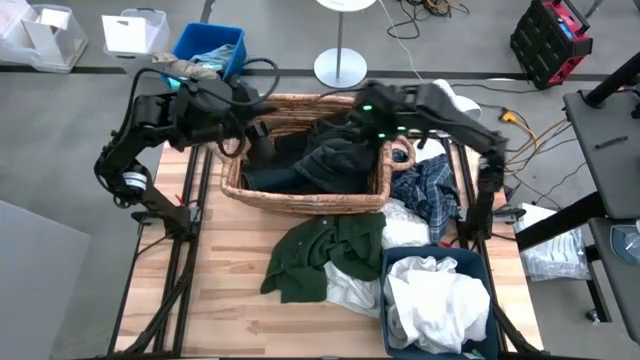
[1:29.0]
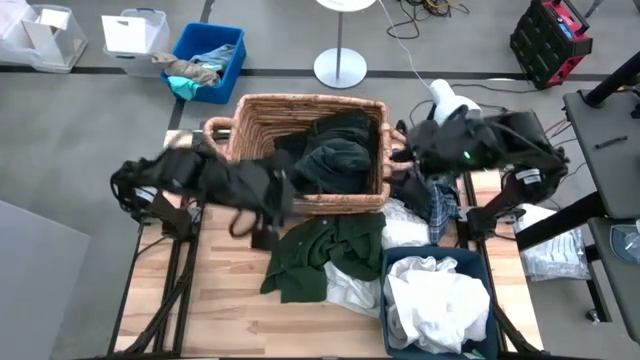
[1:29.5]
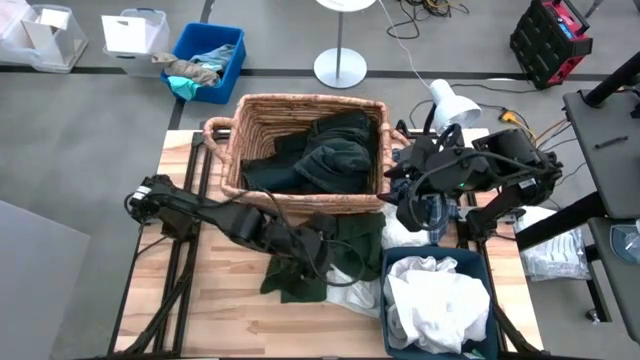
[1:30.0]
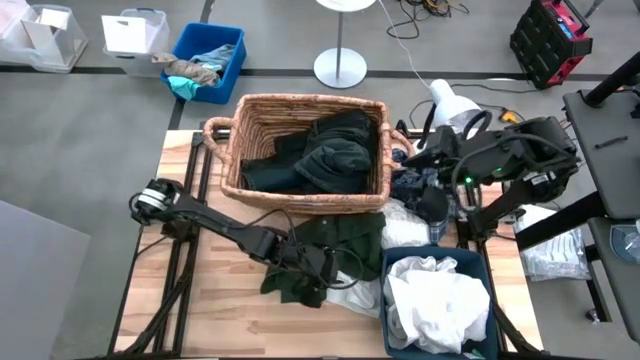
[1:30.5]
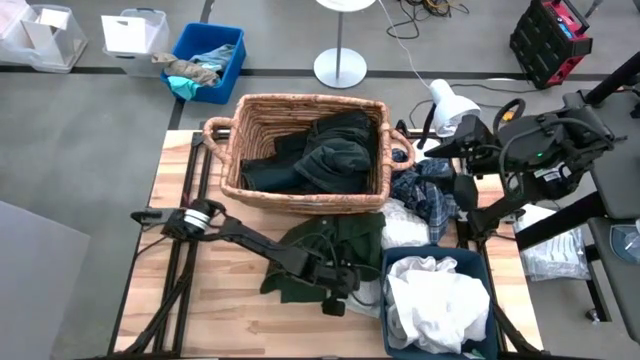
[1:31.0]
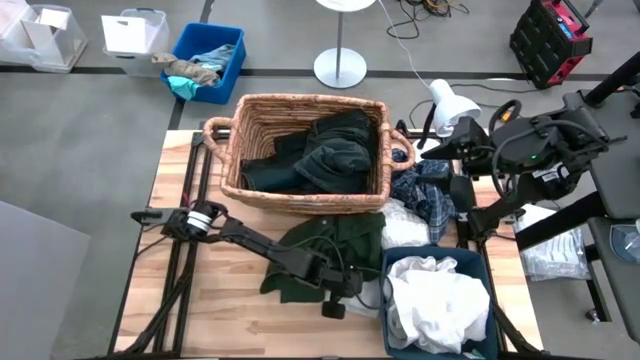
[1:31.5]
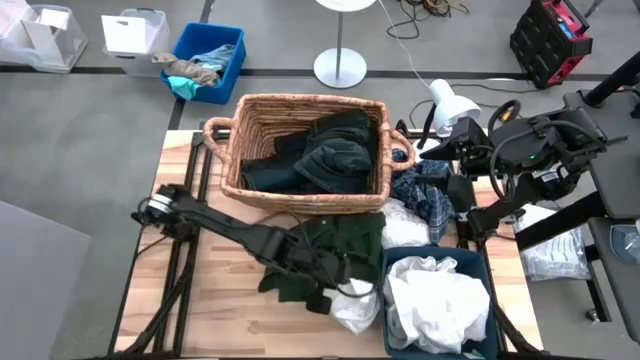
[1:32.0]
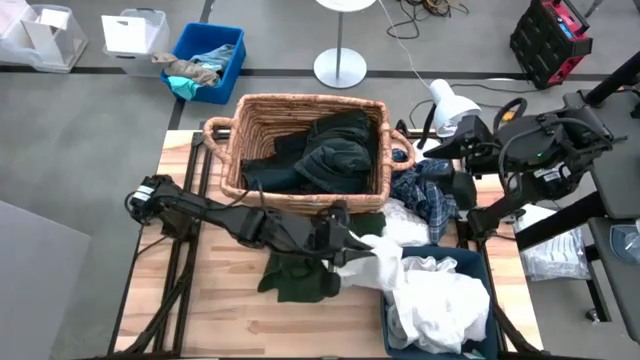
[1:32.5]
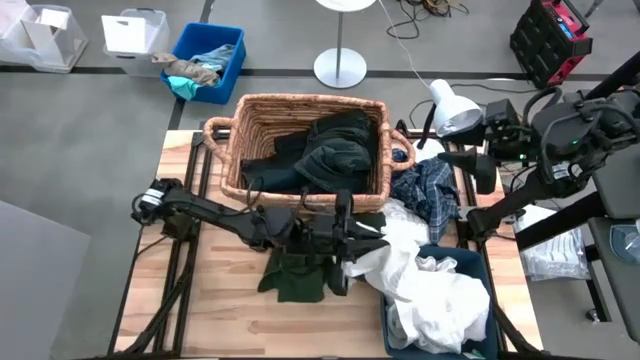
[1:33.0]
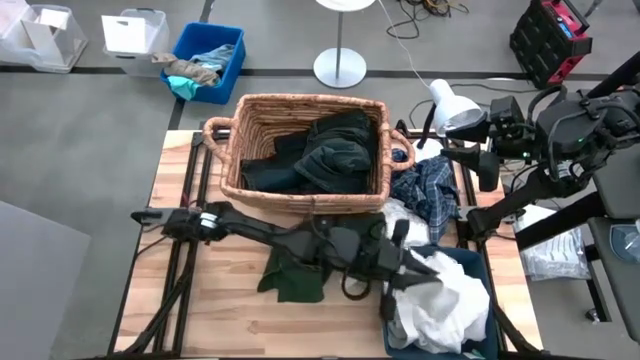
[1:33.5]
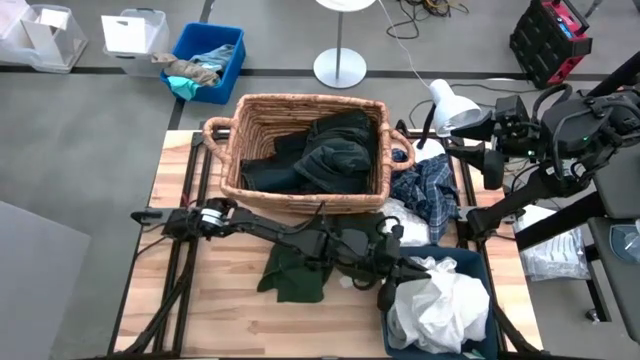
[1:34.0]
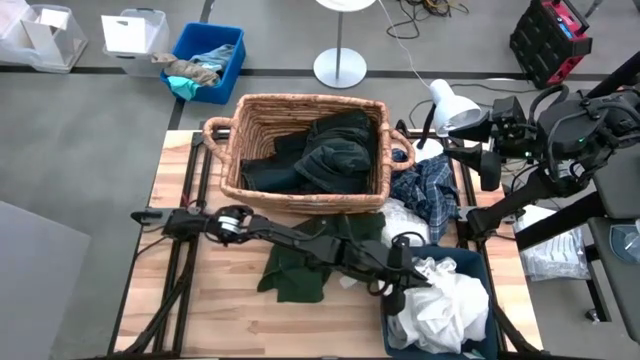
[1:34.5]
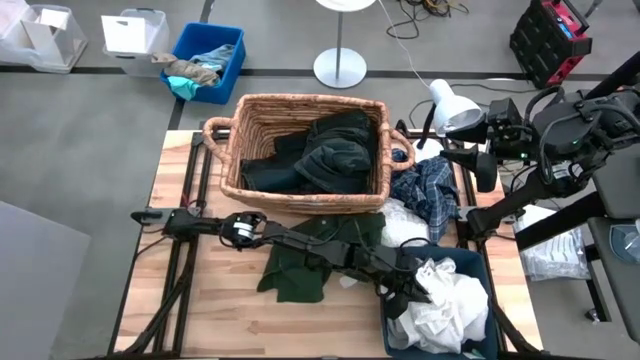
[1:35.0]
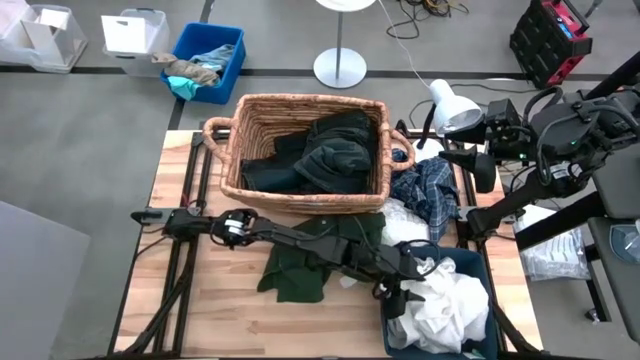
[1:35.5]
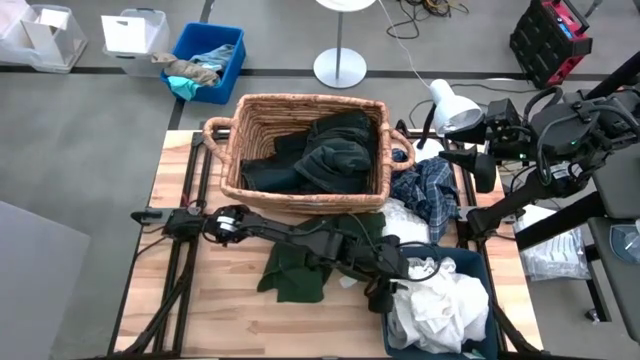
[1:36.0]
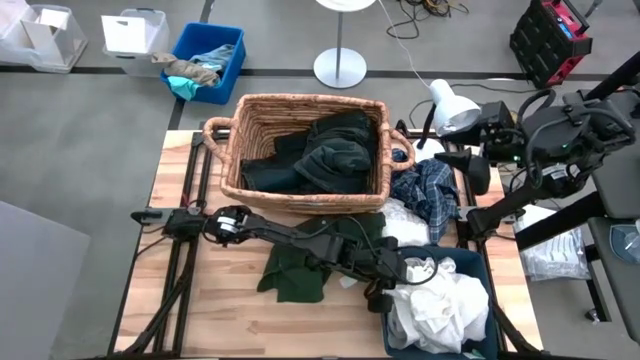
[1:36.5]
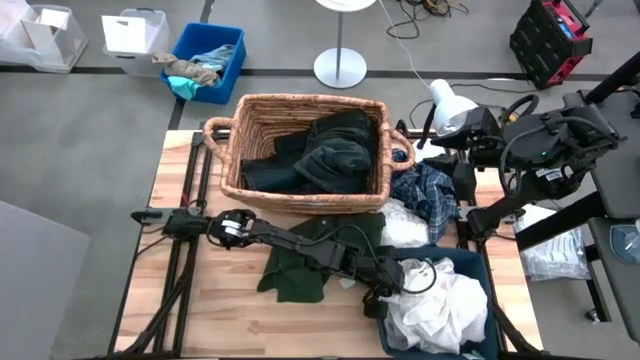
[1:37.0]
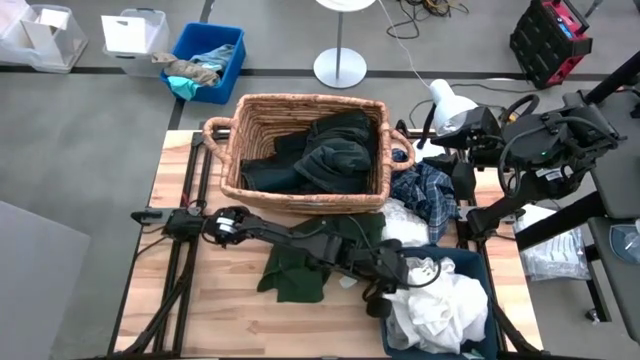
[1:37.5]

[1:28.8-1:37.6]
Task: Sort clothes
Put the white underwear into the blue laundry bin

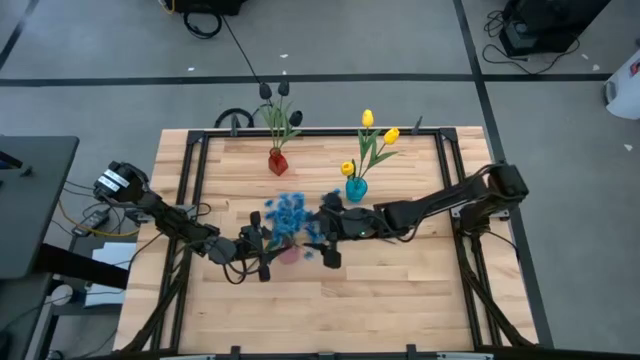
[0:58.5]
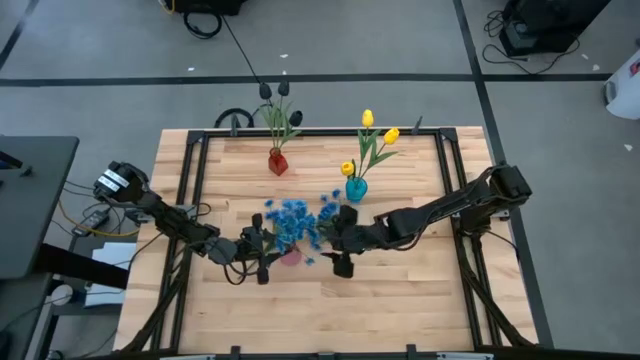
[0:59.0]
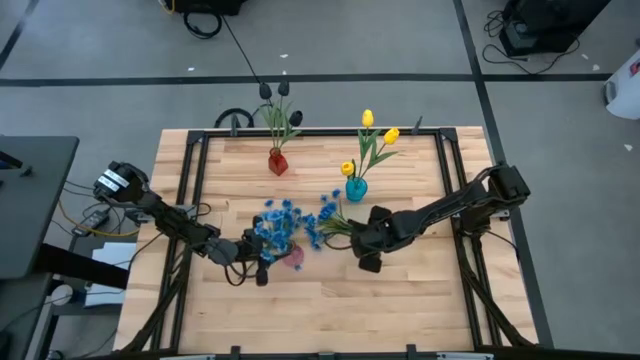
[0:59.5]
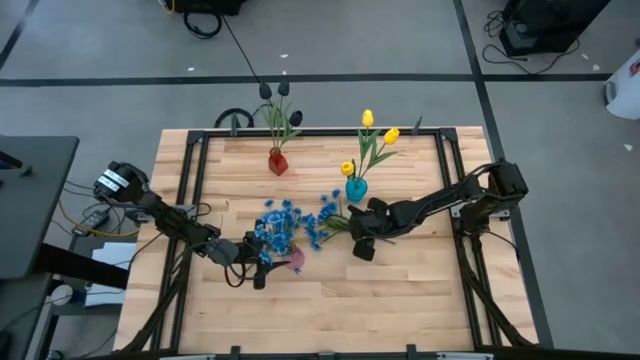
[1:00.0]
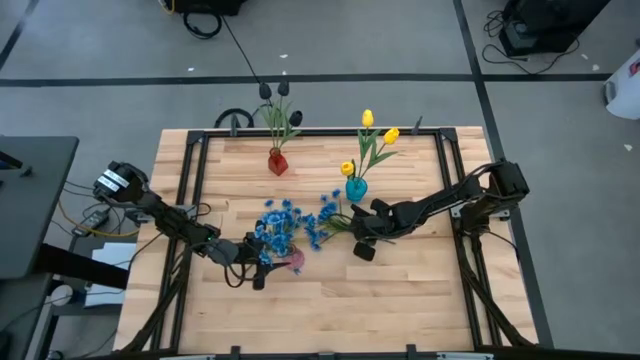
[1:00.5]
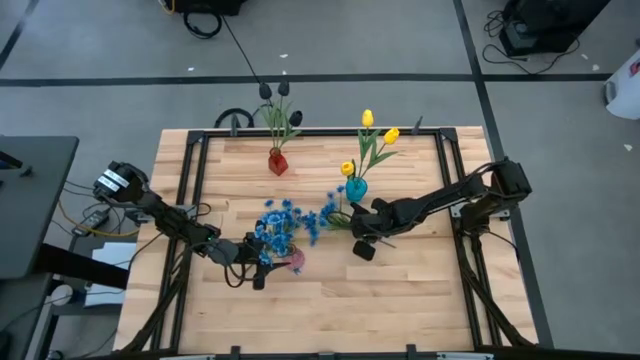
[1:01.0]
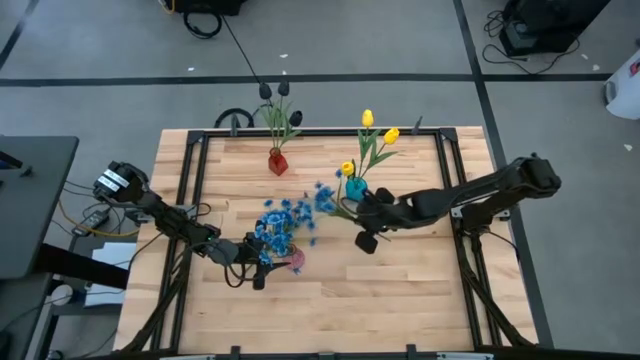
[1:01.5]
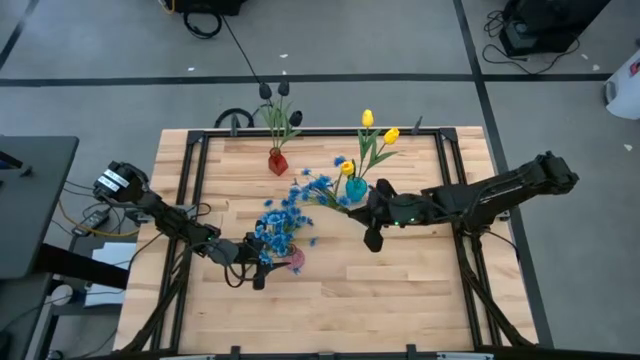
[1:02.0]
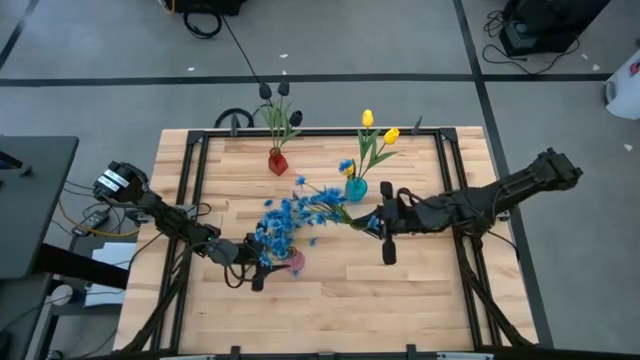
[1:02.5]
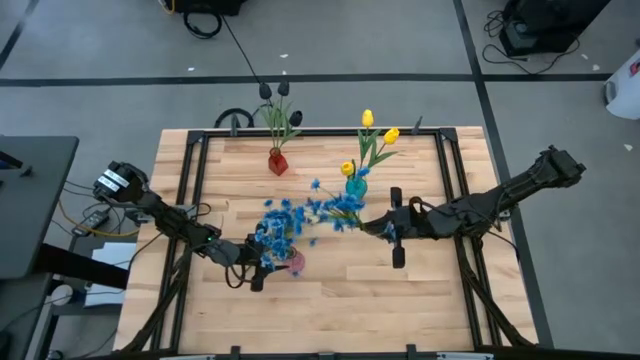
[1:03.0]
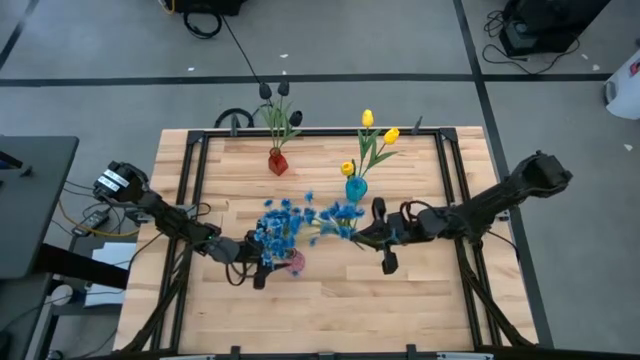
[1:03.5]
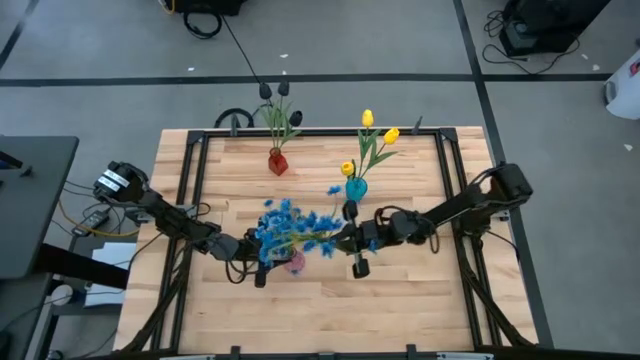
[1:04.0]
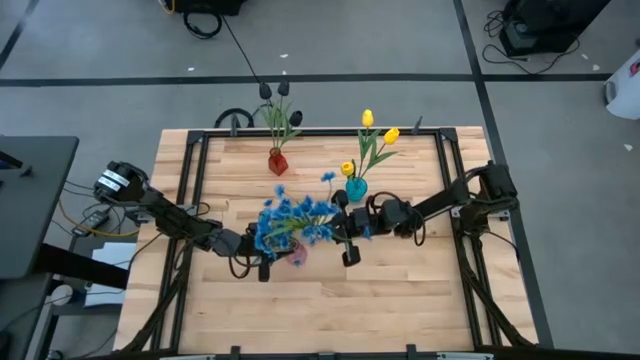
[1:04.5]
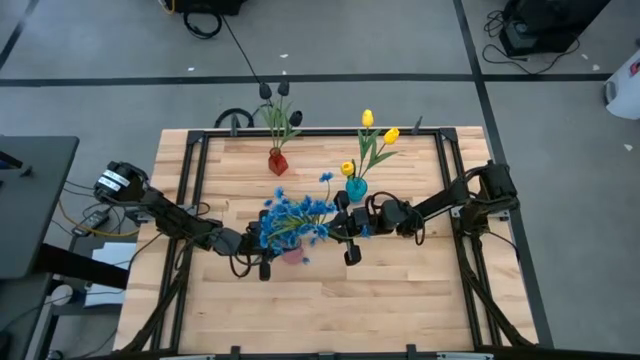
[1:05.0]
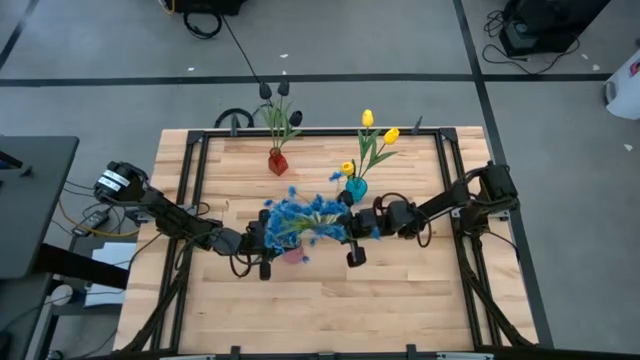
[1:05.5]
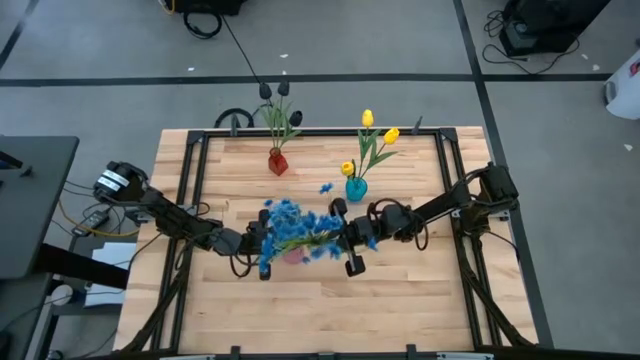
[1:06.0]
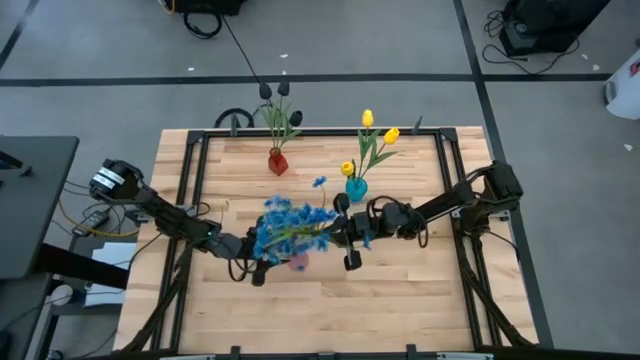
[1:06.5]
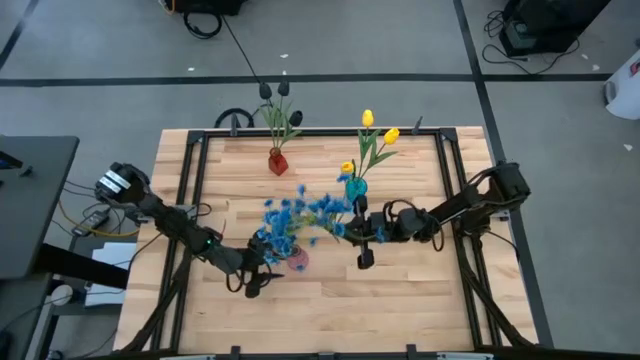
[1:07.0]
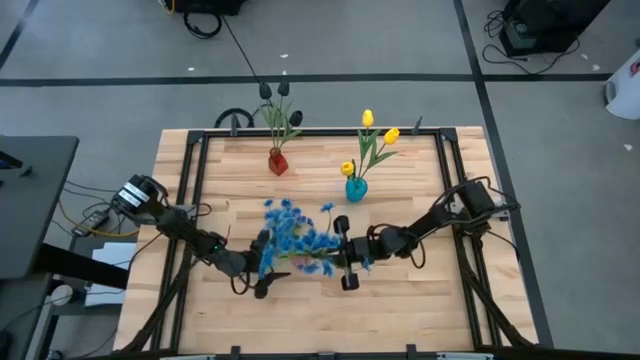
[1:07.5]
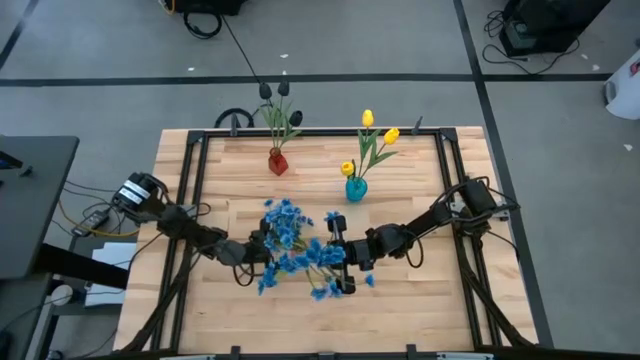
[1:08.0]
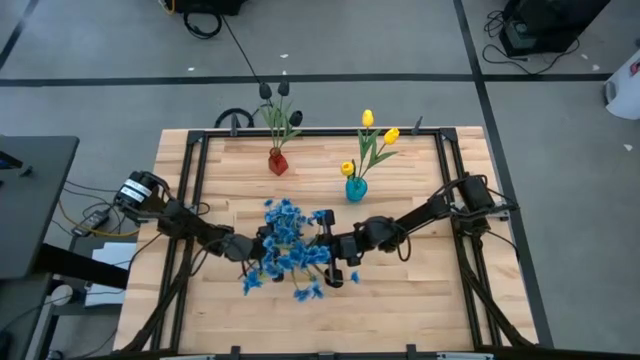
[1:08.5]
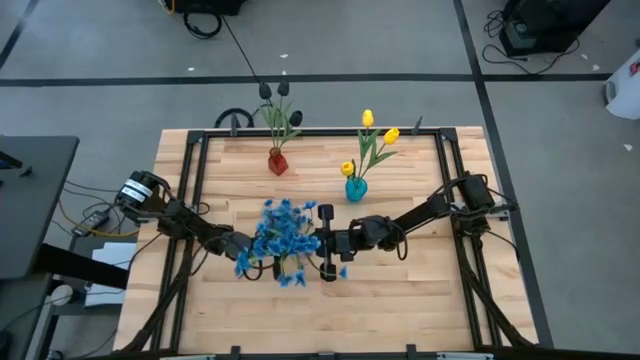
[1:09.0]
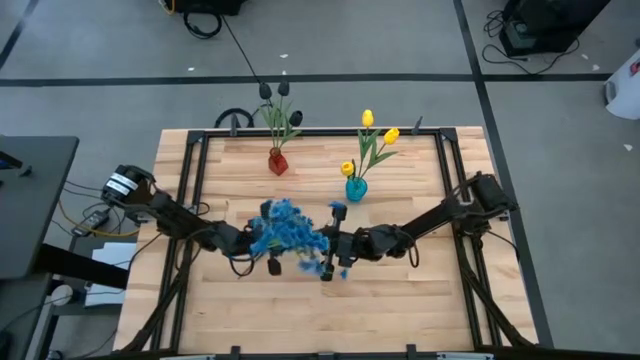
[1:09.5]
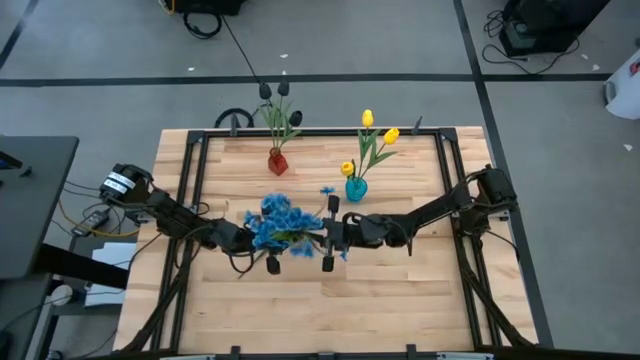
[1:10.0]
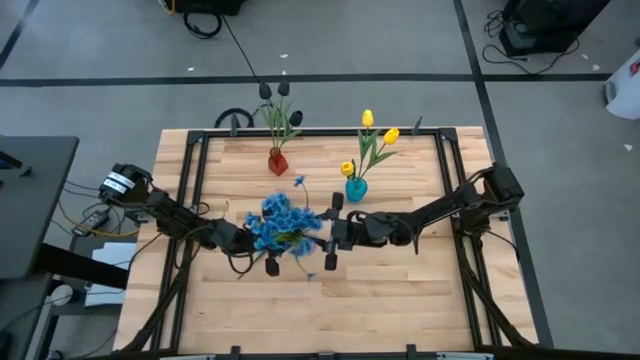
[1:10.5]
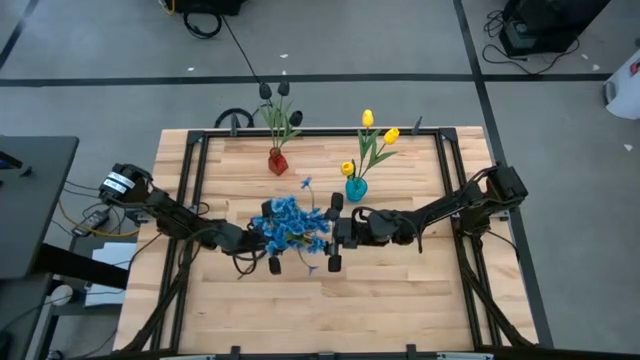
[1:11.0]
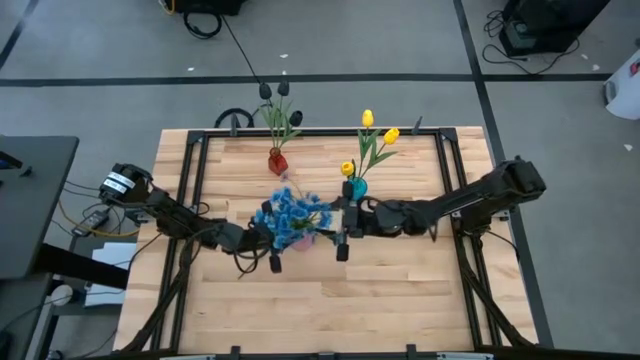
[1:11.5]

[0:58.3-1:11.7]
Task: Sort flowers into vase by color
Put the right blue flowers into the violet vase
